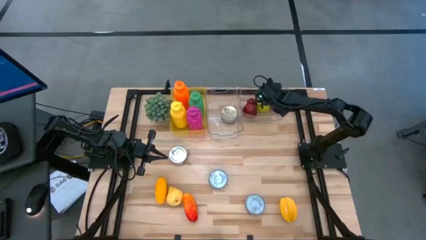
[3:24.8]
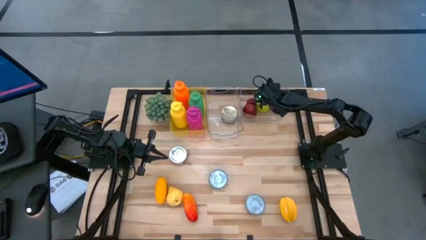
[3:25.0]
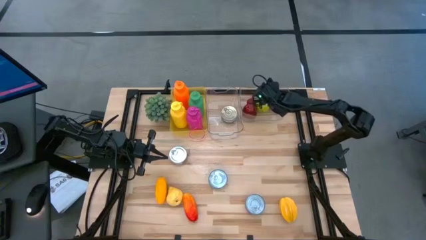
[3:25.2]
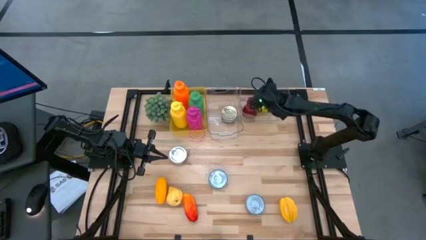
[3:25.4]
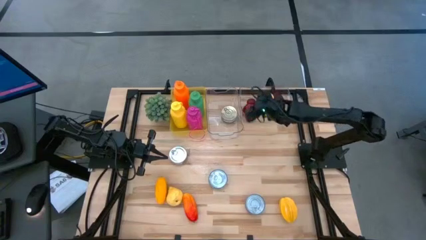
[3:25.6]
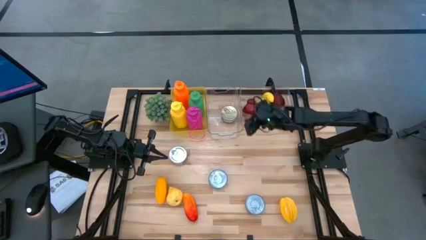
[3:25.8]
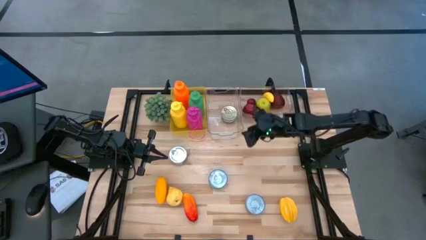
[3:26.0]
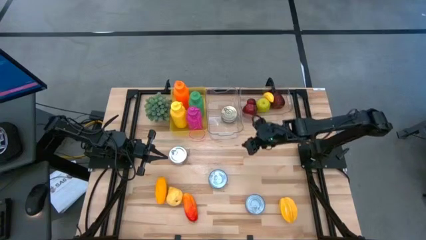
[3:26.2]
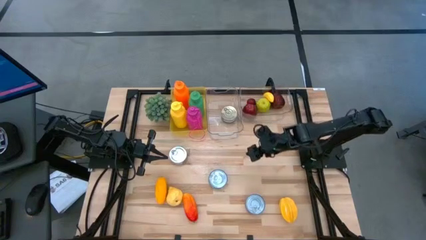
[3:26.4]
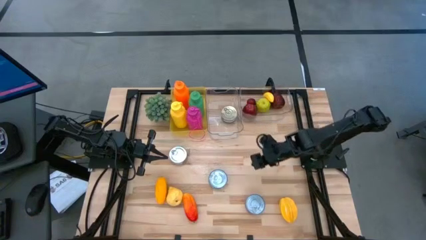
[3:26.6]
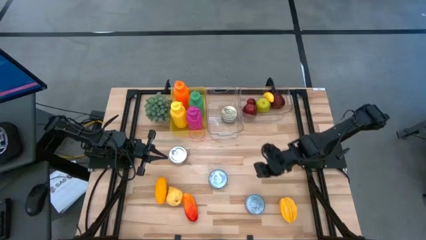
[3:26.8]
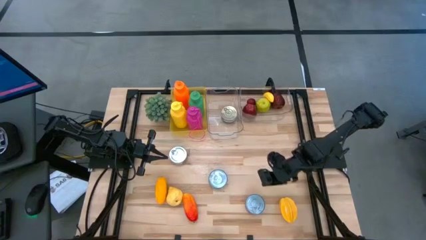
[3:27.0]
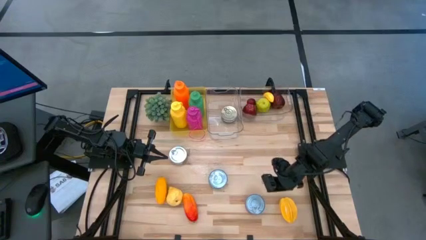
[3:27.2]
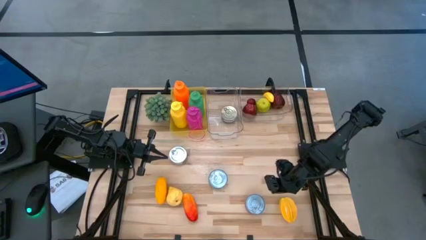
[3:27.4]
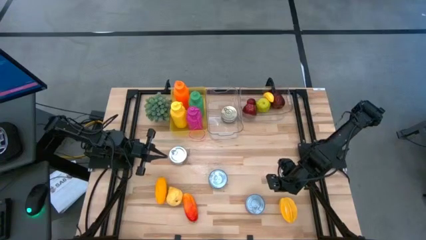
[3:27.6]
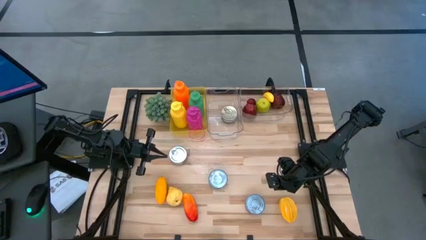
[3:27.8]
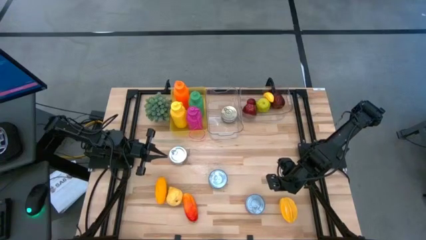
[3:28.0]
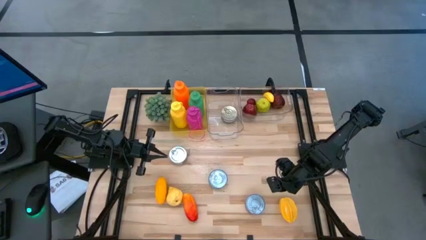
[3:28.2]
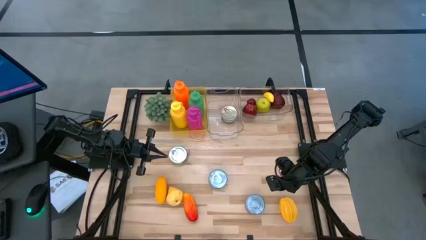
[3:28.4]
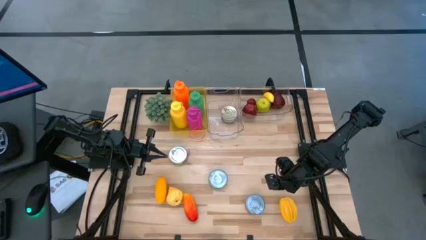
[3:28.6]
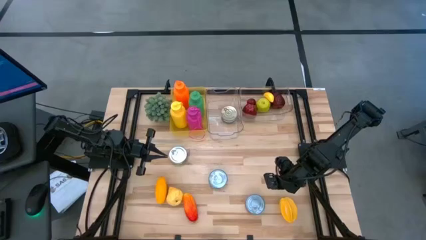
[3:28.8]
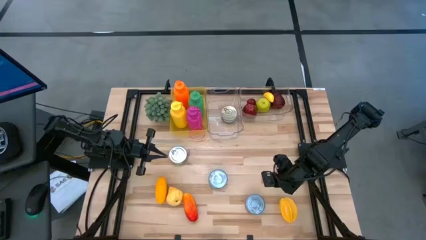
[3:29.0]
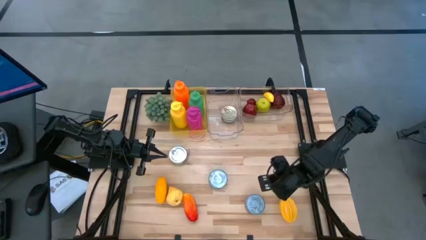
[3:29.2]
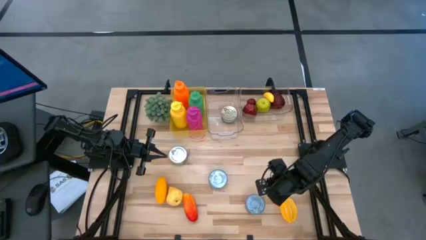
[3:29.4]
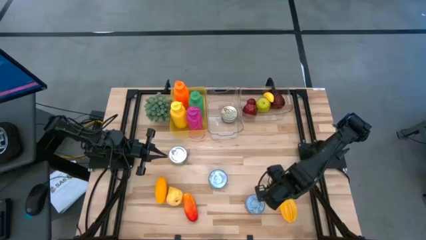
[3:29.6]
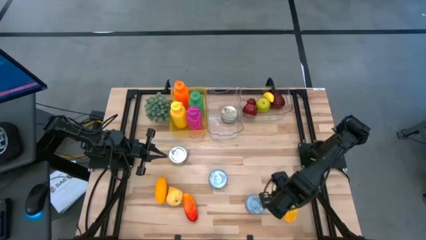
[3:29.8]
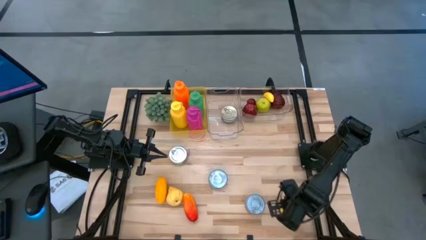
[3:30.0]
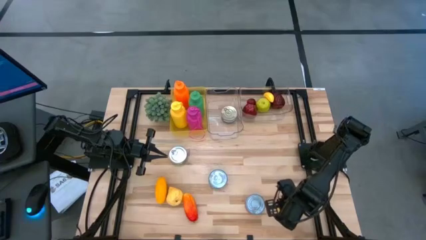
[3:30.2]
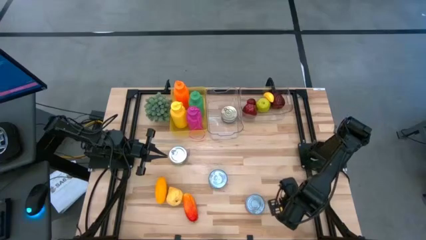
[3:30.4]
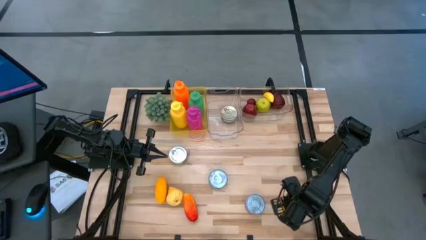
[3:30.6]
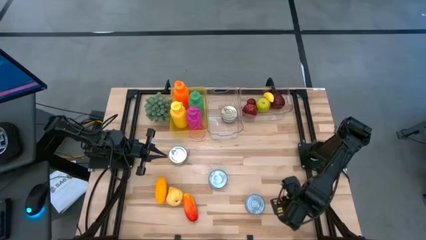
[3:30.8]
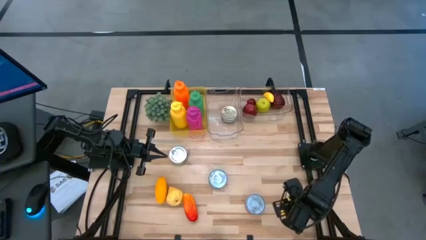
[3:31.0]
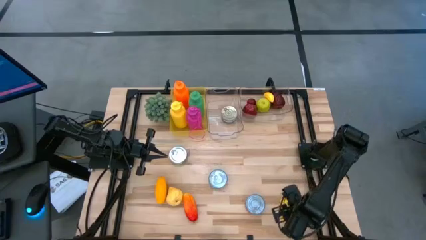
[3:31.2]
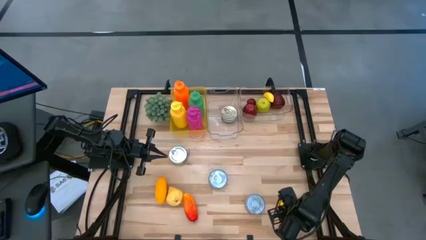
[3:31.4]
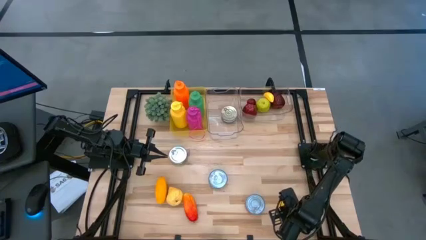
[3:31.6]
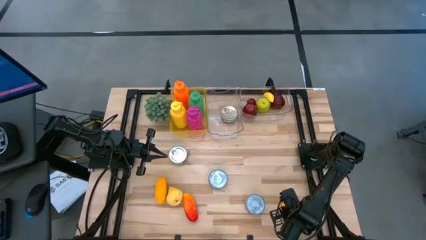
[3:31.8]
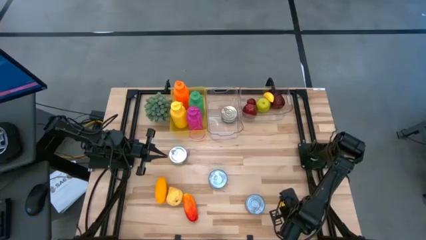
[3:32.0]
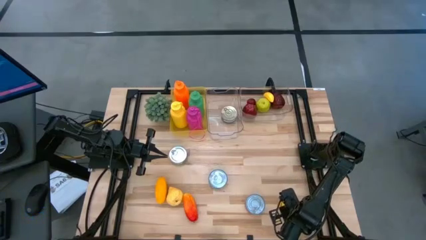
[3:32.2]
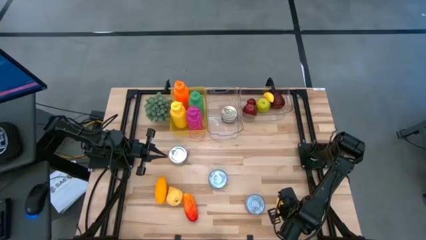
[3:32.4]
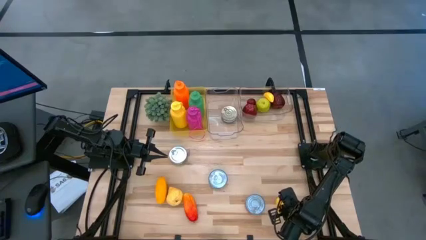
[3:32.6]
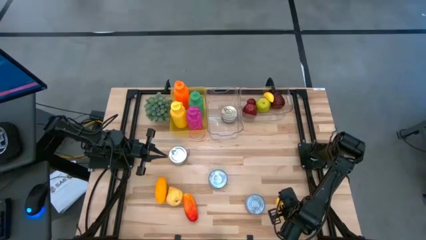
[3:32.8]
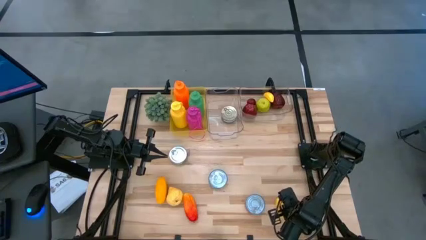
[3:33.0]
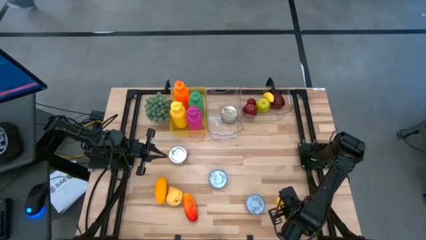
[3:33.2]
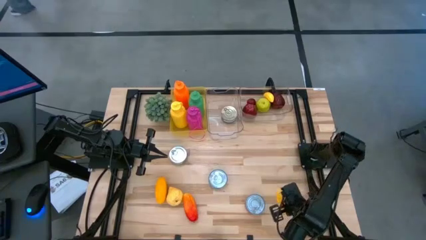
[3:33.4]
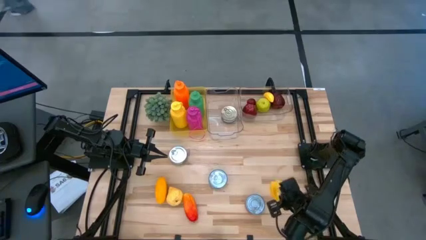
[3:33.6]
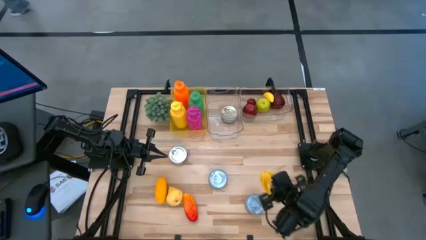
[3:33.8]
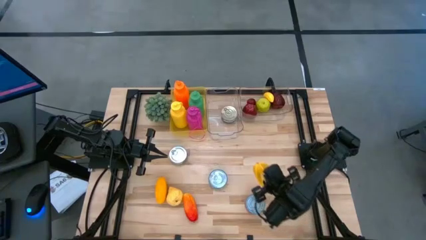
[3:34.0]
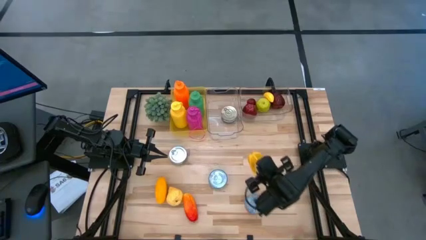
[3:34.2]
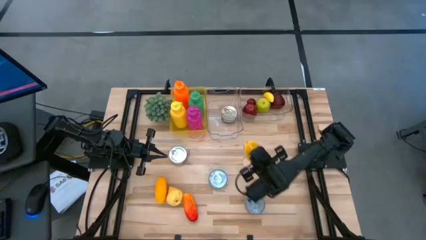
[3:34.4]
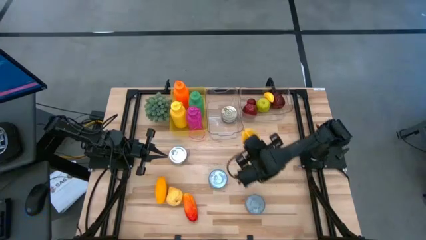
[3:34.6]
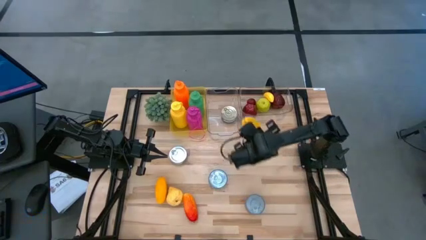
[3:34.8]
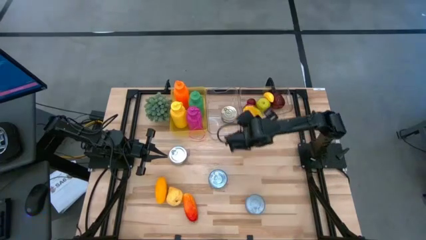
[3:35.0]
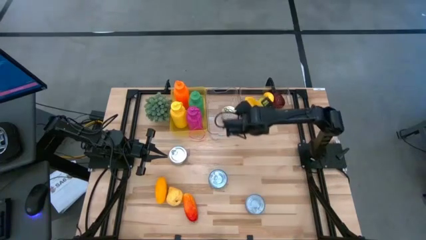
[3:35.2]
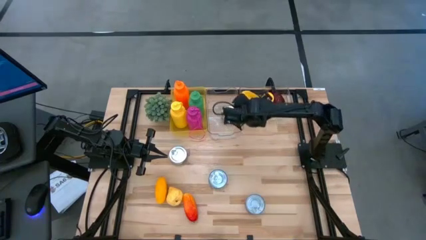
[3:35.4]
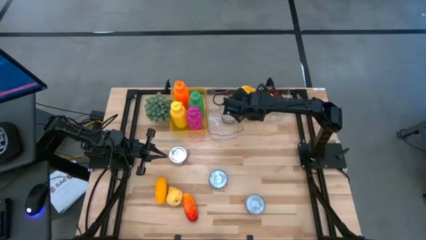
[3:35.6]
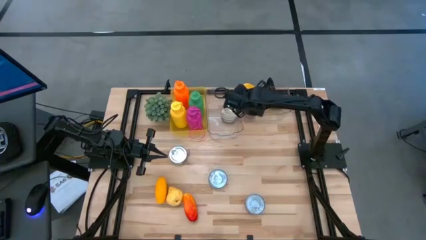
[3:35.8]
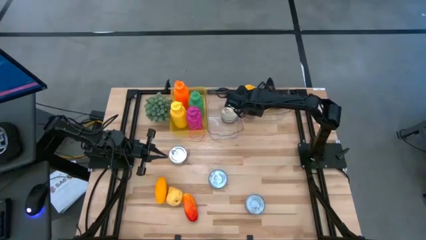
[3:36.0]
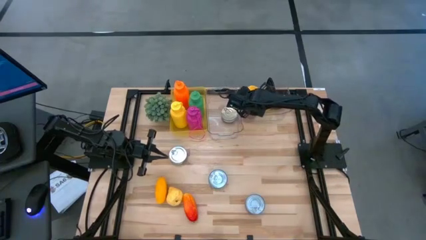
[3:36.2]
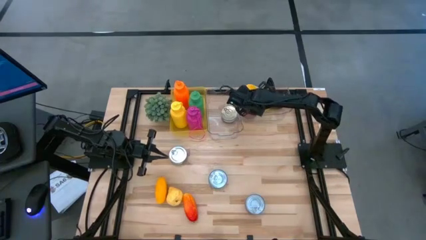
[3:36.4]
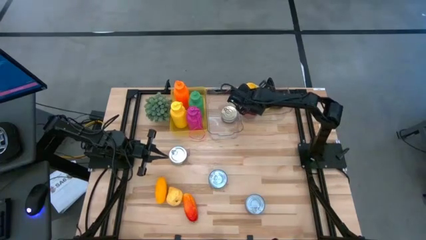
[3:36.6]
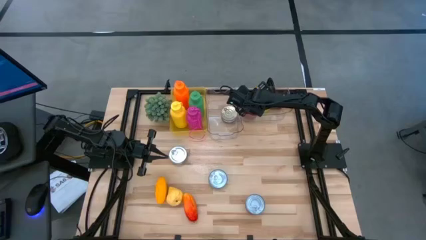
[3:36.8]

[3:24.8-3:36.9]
Task: Pick & Place Food Item
Put the yellow starfruit into the right transparent bin
